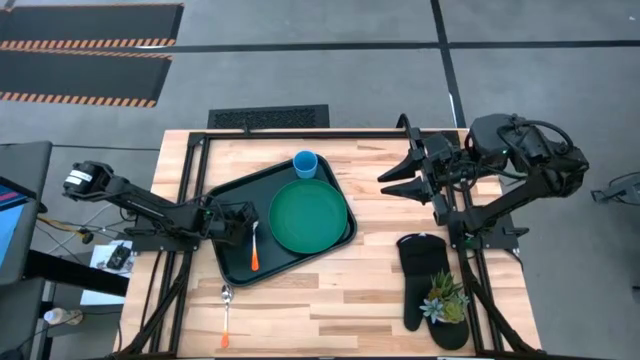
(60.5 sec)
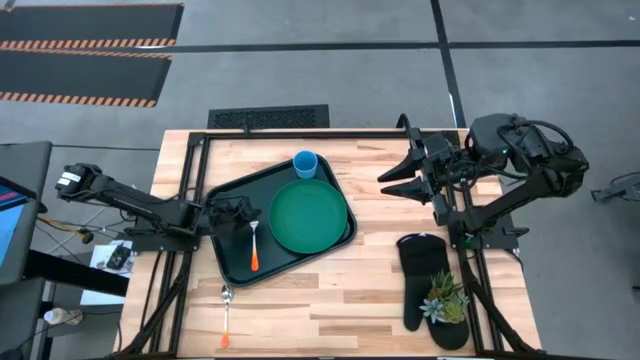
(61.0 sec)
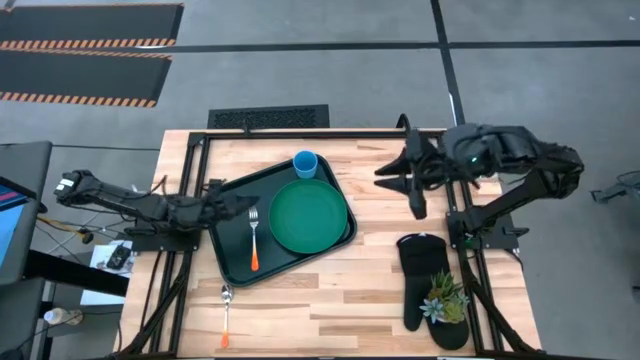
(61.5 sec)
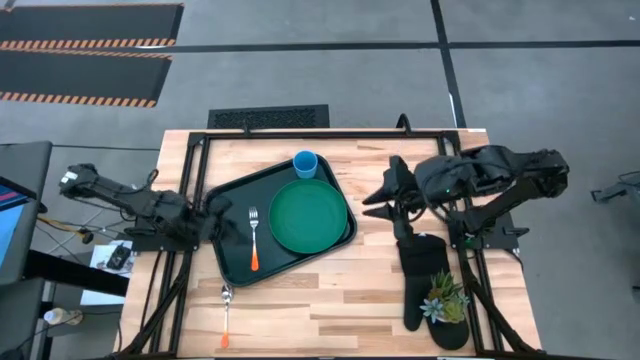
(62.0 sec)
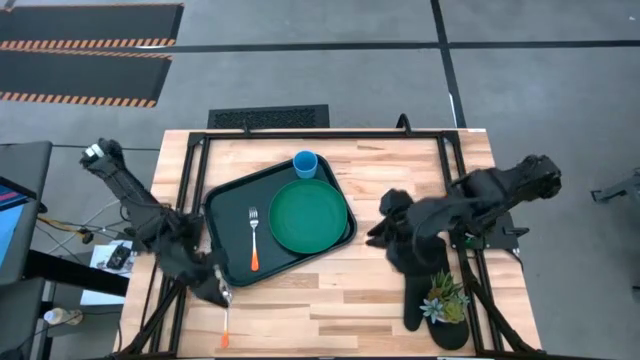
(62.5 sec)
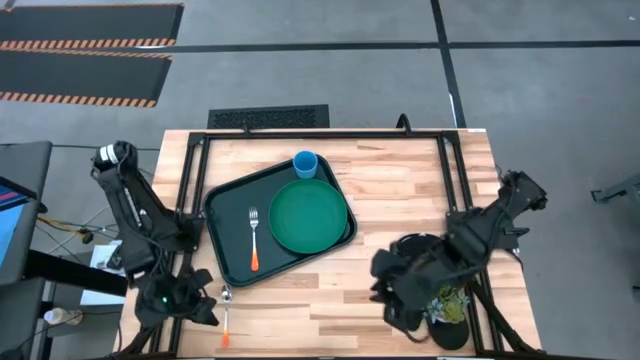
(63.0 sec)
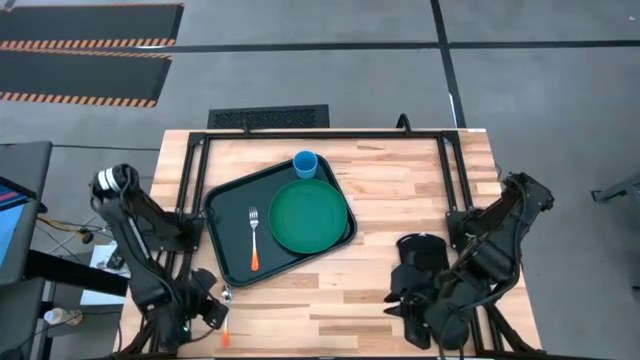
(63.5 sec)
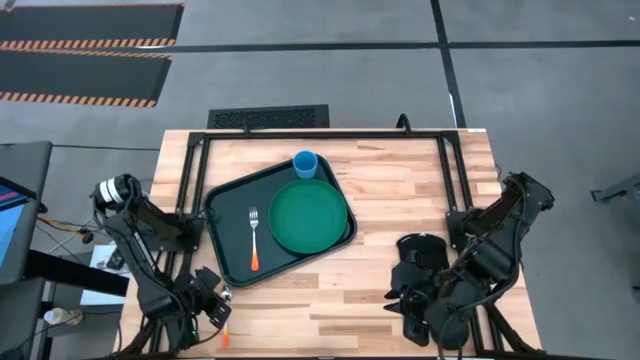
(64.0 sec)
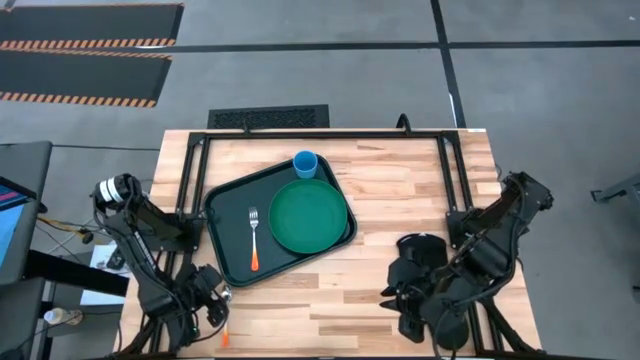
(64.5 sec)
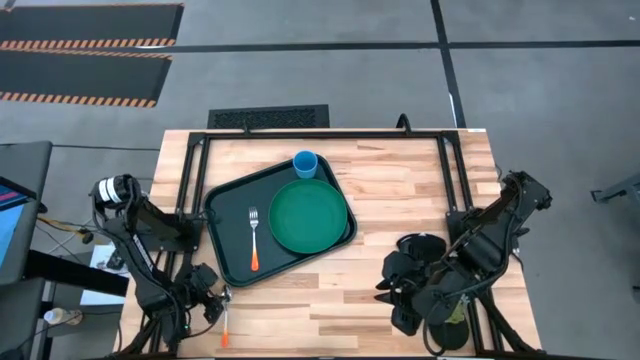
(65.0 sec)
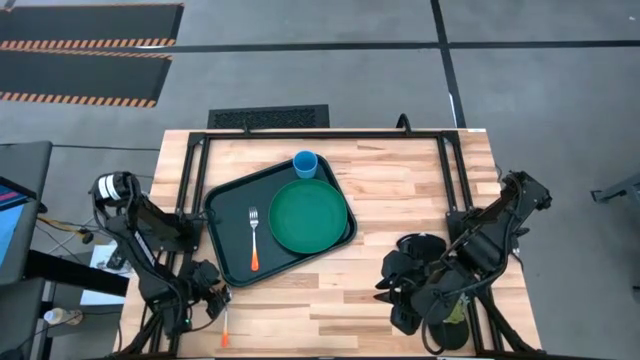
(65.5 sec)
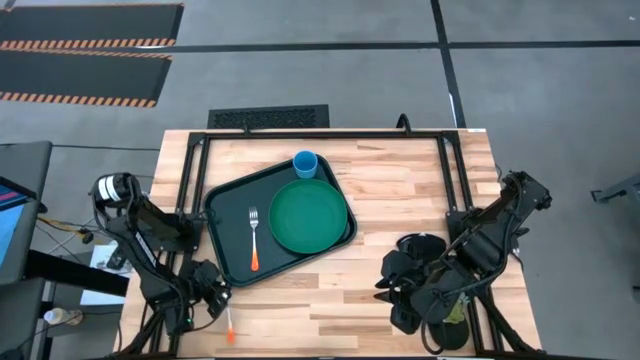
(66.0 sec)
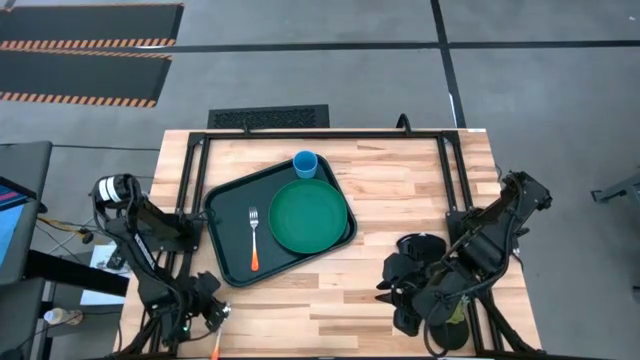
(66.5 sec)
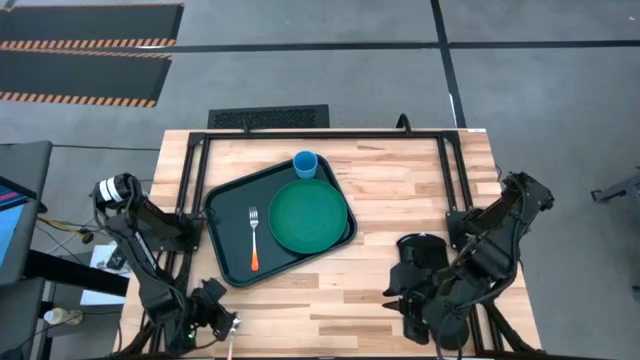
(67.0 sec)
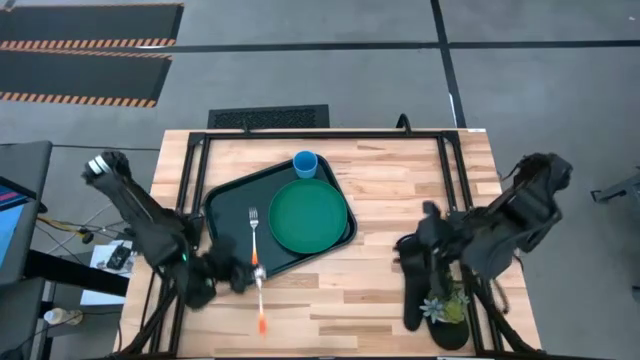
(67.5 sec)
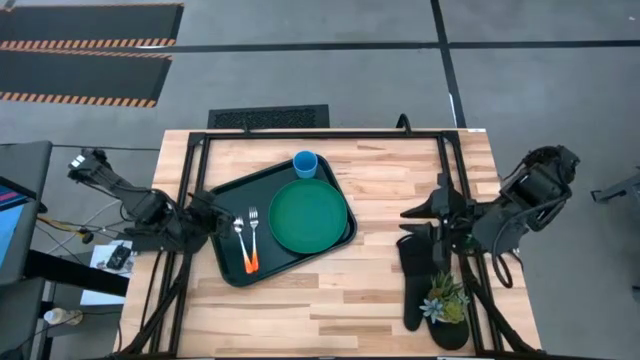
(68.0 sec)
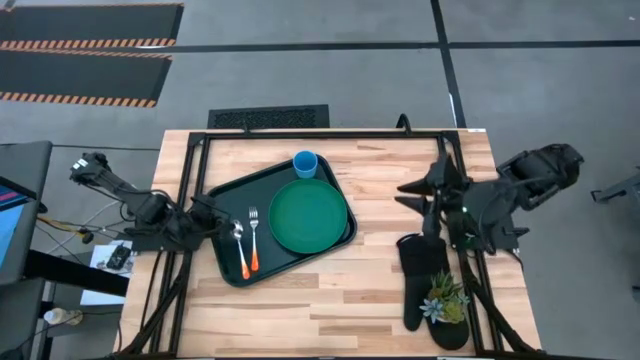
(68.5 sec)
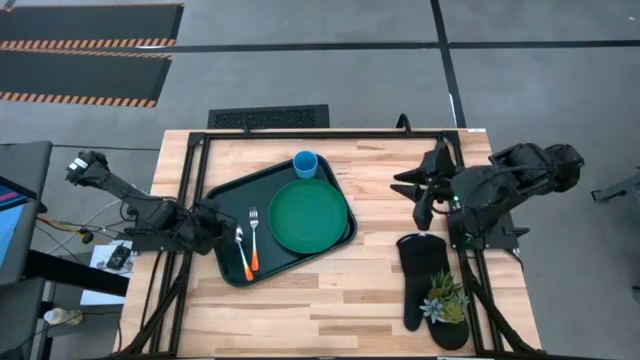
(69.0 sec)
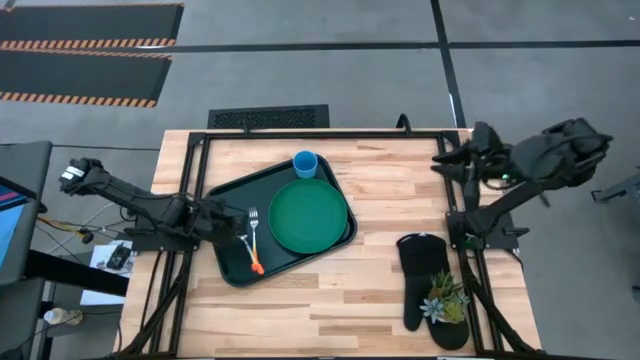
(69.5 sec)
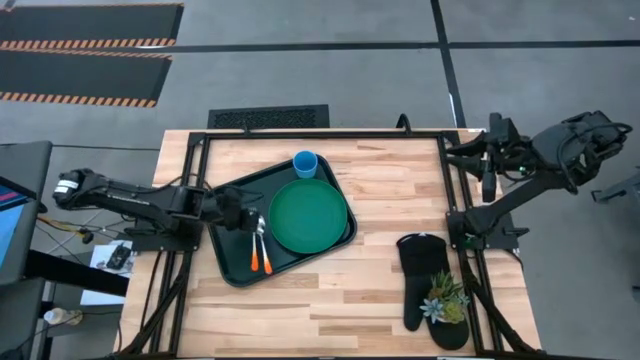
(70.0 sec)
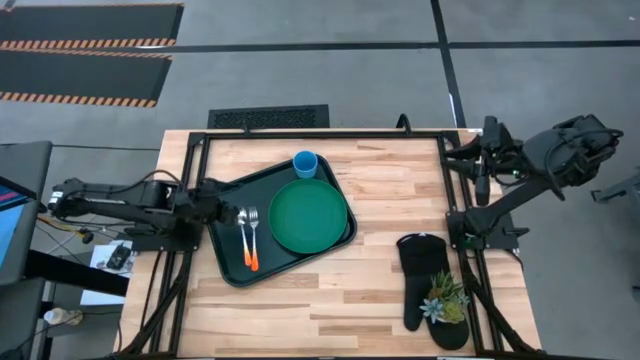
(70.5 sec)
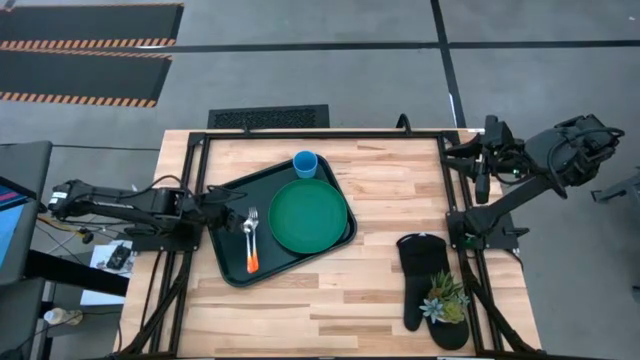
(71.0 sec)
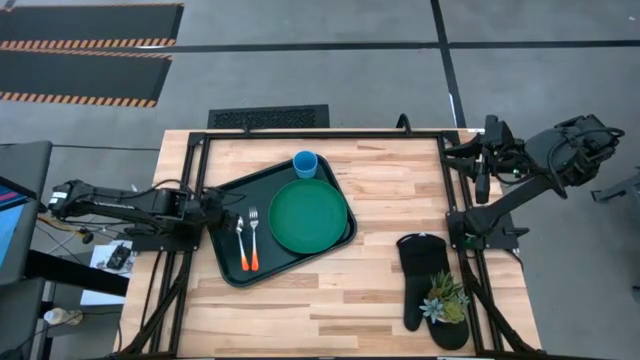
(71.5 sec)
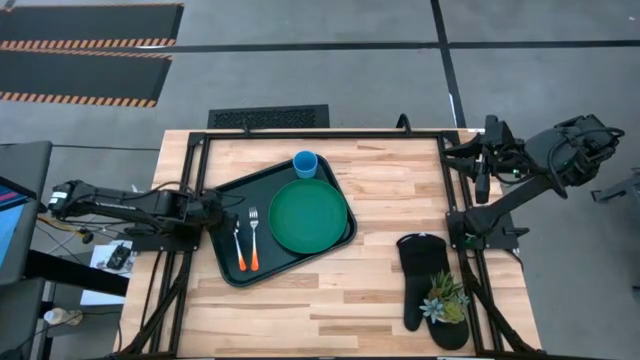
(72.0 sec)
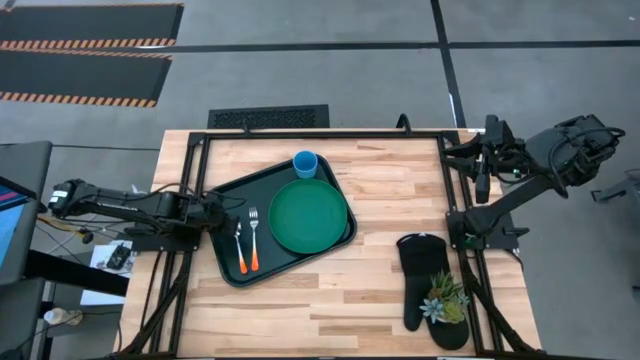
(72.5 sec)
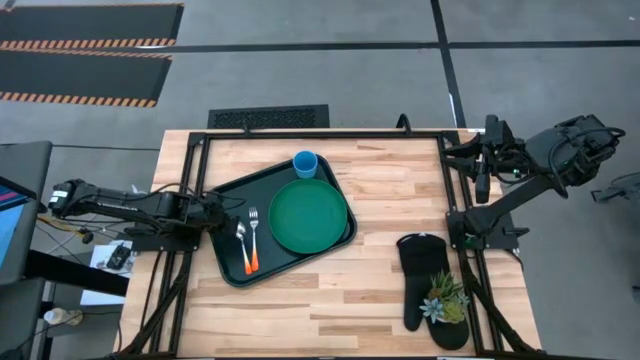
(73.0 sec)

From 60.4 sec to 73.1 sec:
Task: Pick and place plate/cup/fork/spoon on tray
Put the orange spoon on the black tray to the left of the orange fork

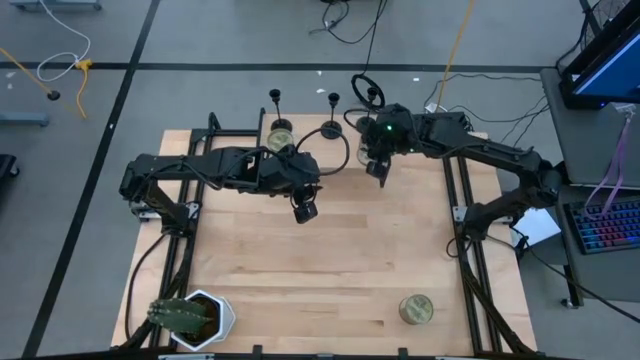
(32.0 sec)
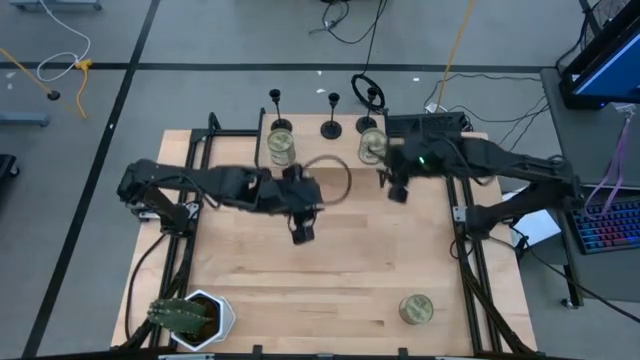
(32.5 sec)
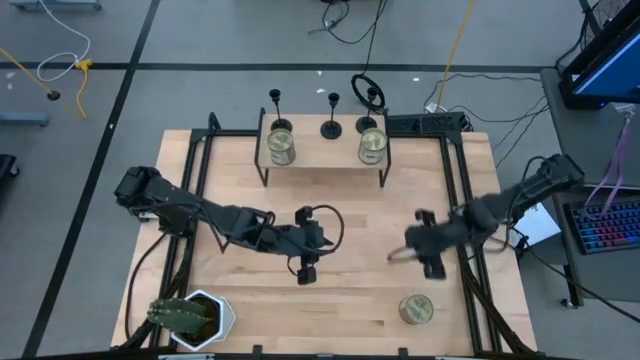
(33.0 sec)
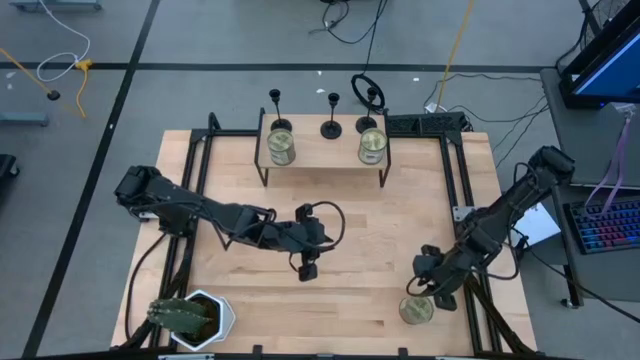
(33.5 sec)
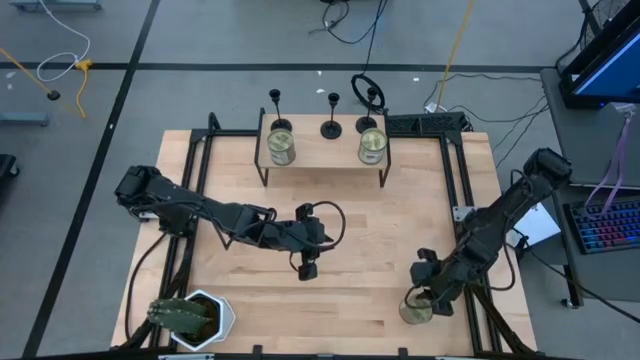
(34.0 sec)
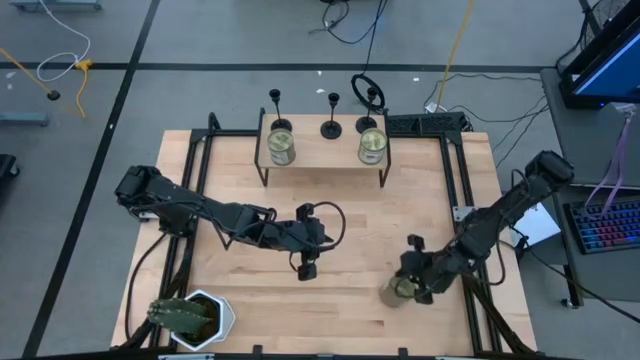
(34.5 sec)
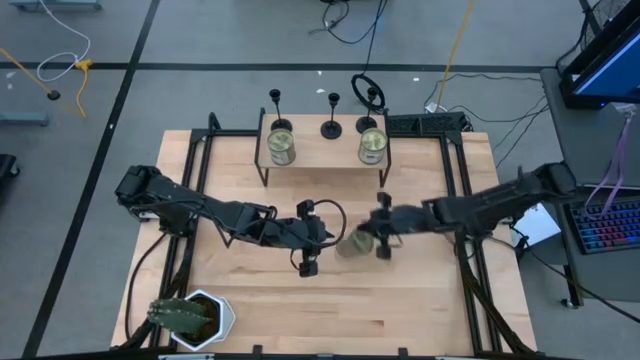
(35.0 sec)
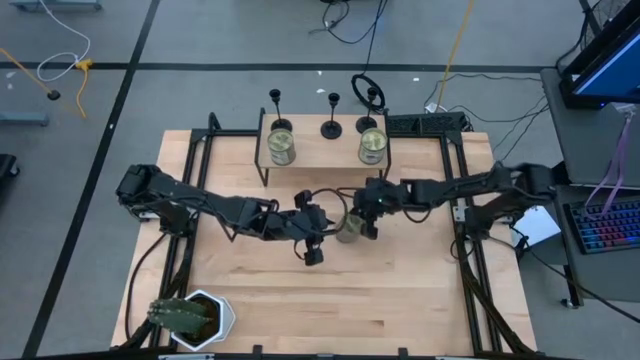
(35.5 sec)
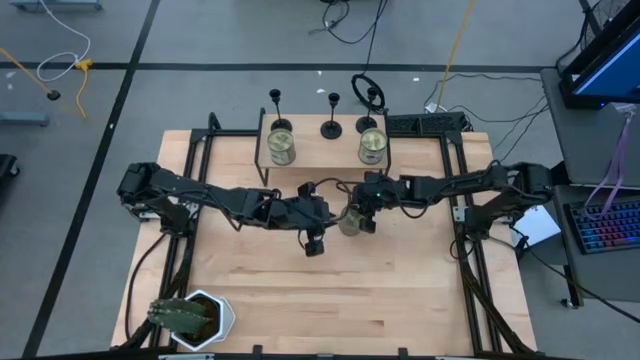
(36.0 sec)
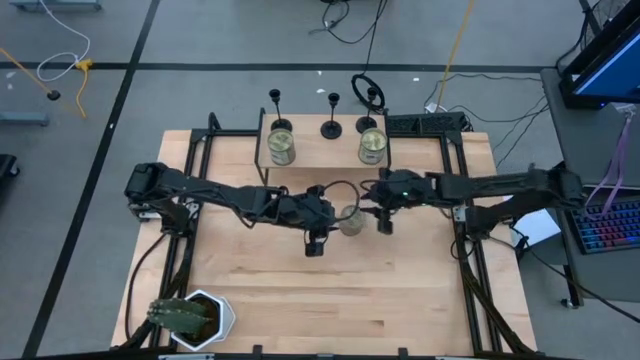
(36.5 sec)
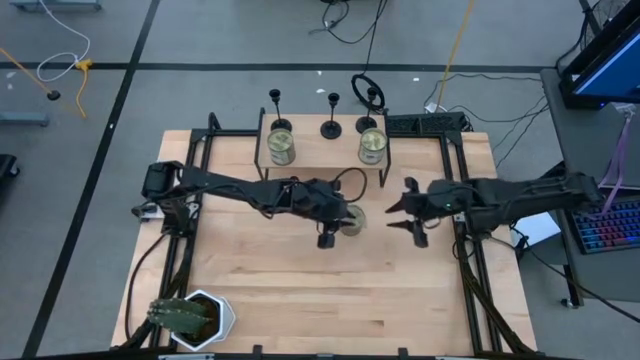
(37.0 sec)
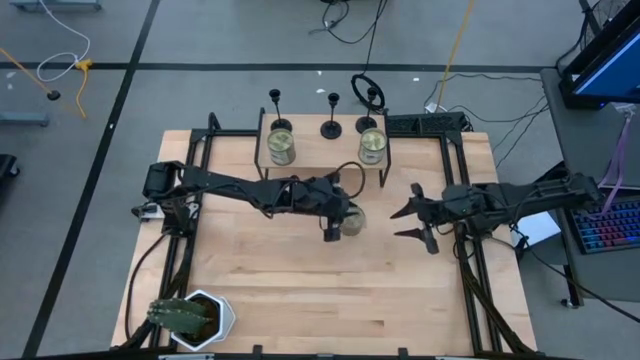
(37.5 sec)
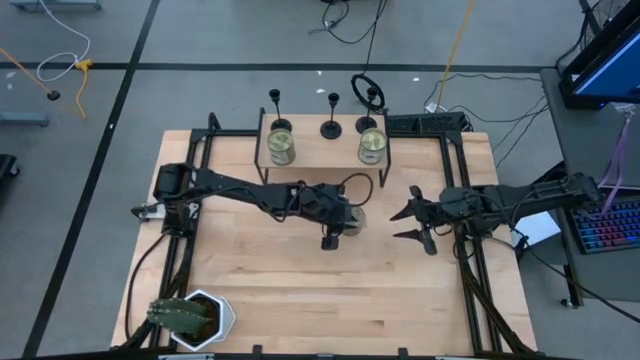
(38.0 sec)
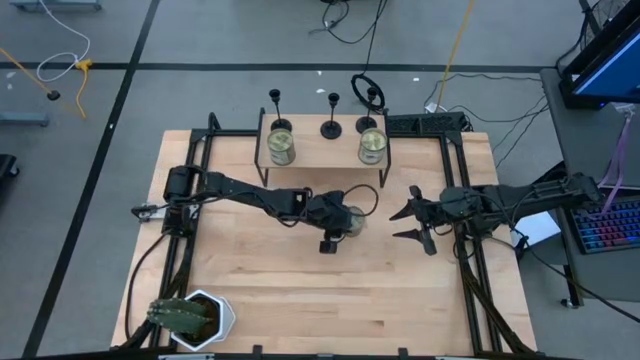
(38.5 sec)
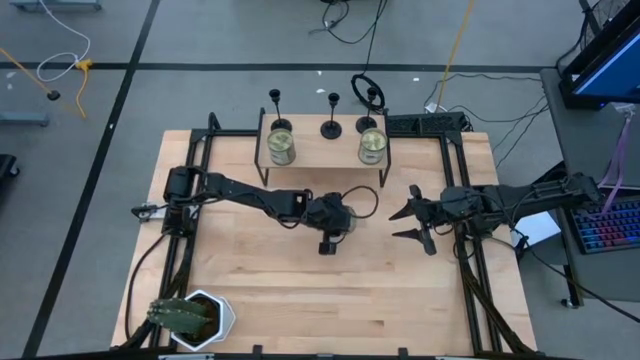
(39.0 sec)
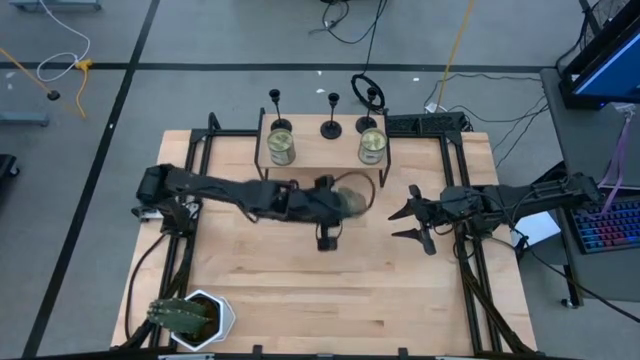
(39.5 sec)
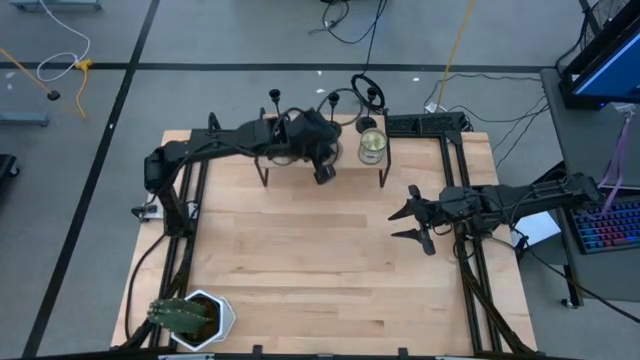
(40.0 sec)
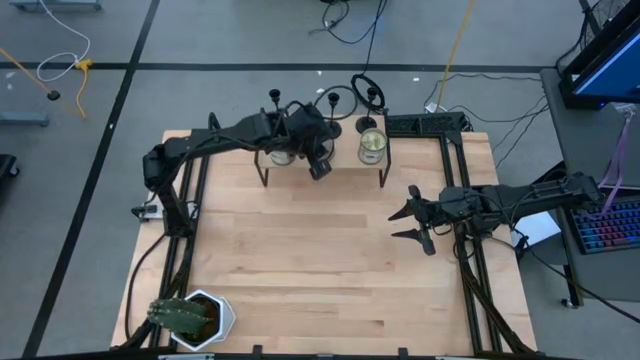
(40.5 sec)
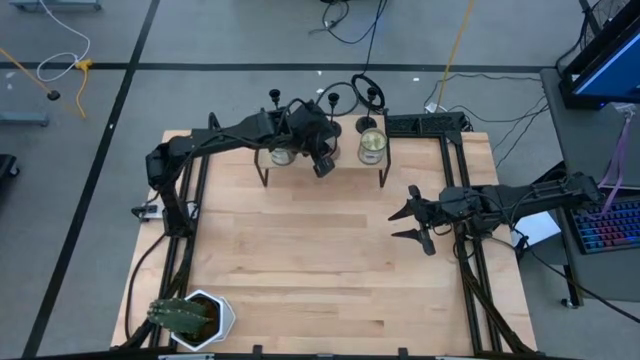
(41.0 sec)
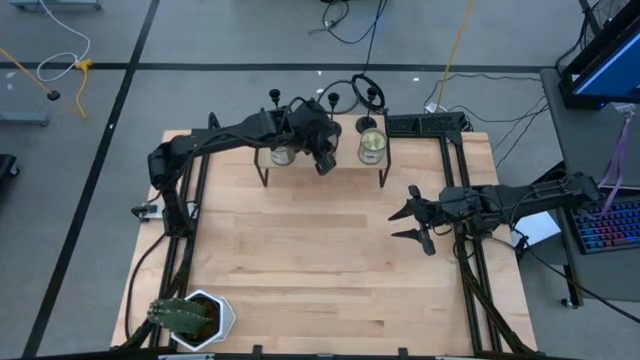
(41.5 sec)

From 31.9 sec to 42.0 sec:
Task: Pick & Place candle stick holders
Put the scented candle on the shelf
